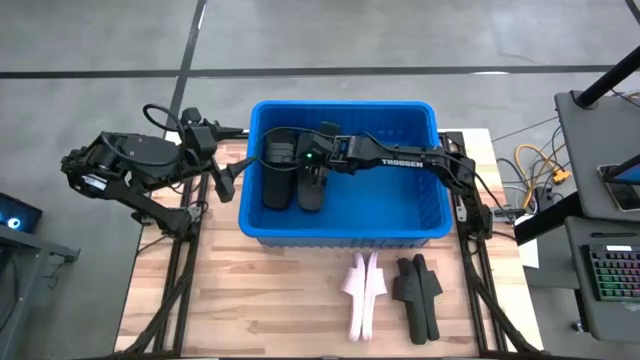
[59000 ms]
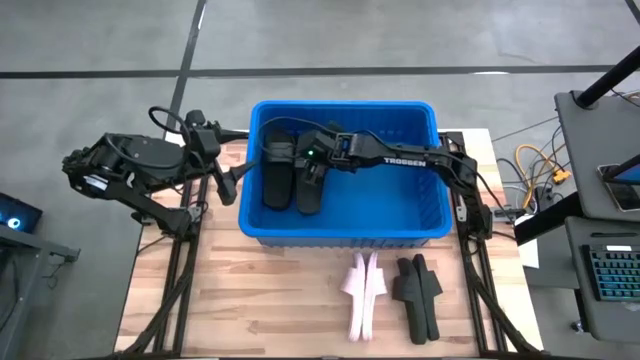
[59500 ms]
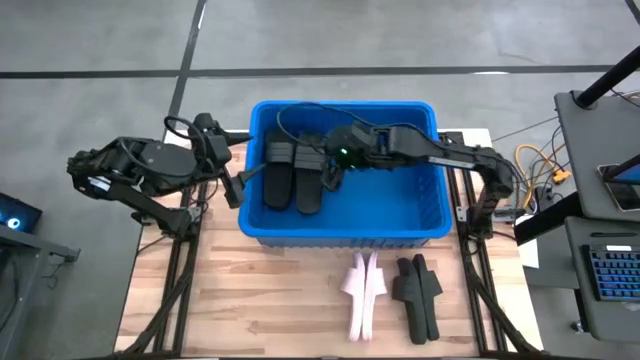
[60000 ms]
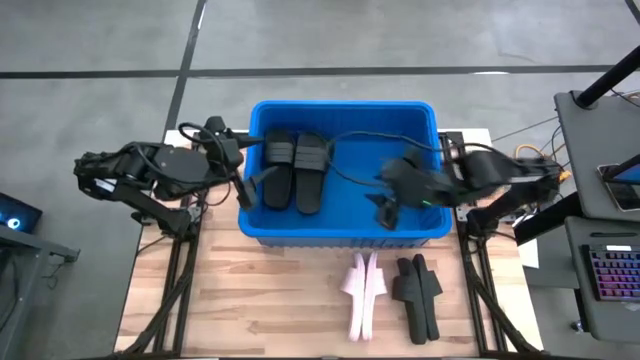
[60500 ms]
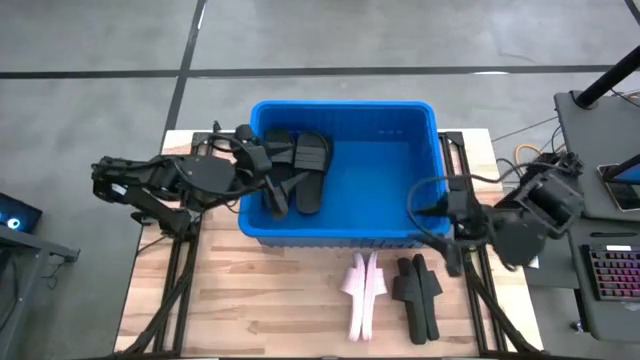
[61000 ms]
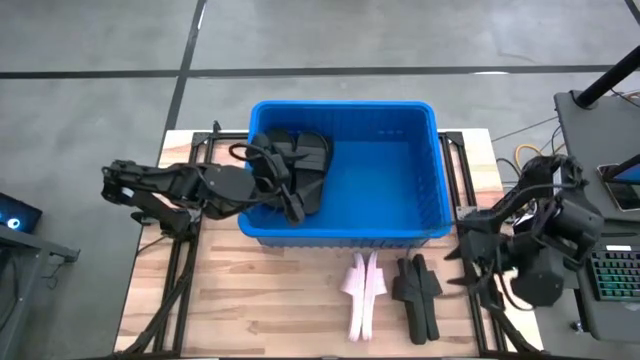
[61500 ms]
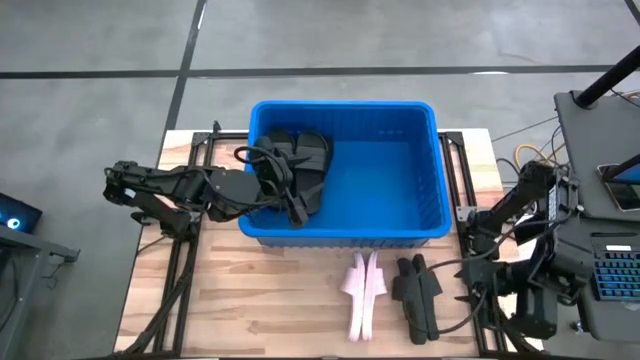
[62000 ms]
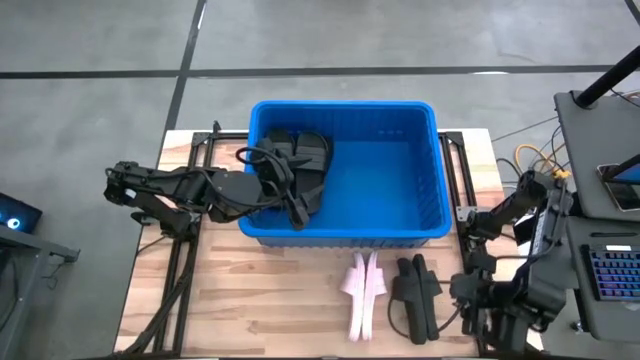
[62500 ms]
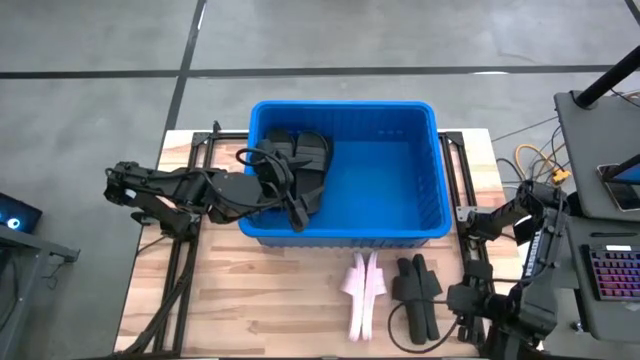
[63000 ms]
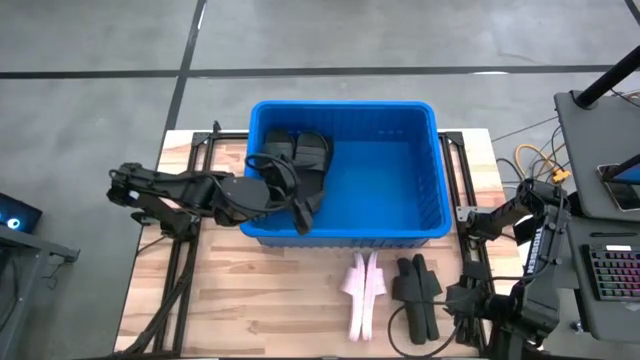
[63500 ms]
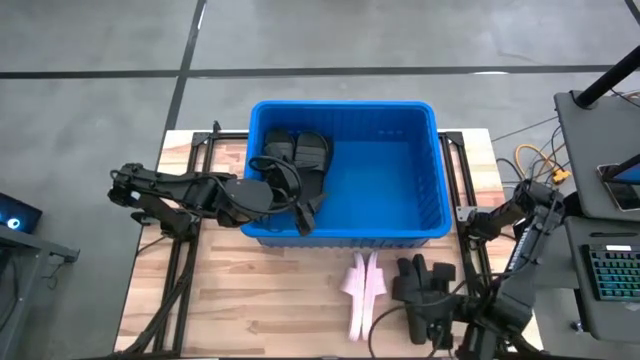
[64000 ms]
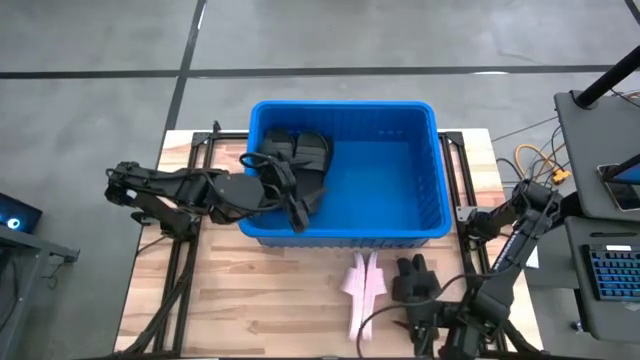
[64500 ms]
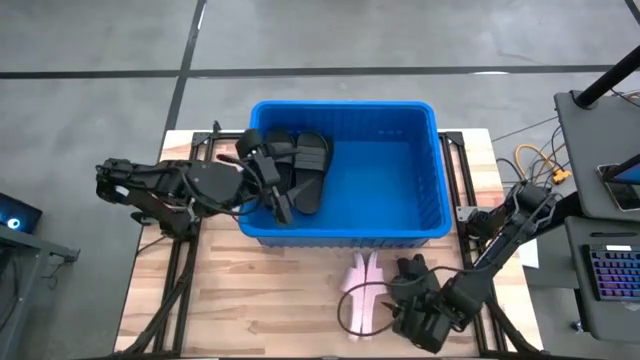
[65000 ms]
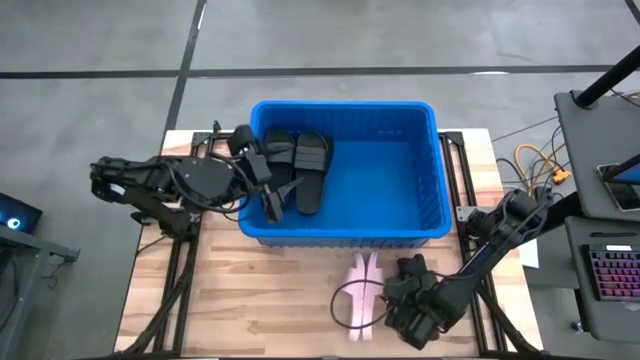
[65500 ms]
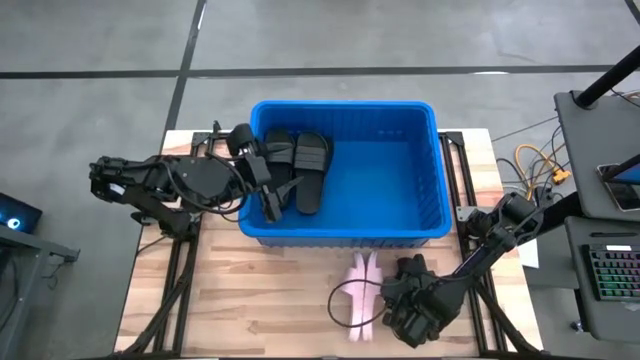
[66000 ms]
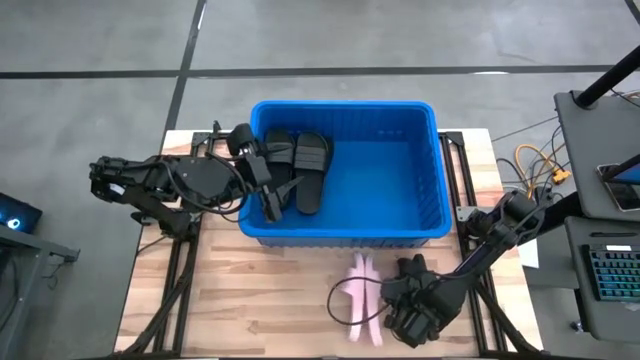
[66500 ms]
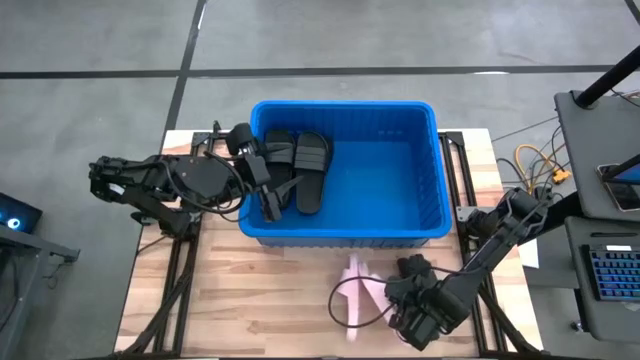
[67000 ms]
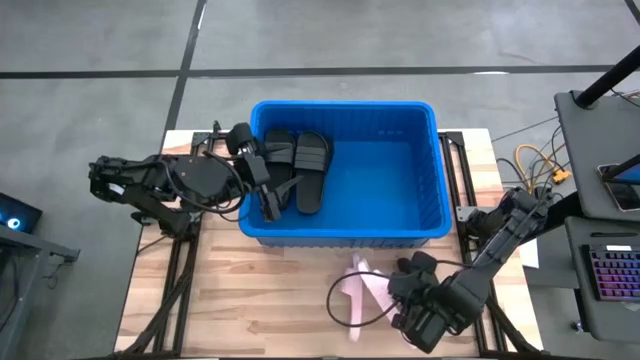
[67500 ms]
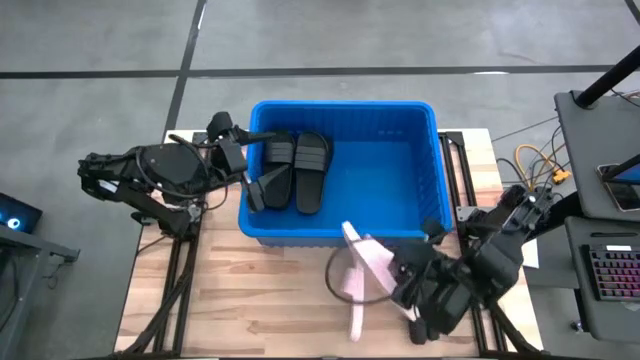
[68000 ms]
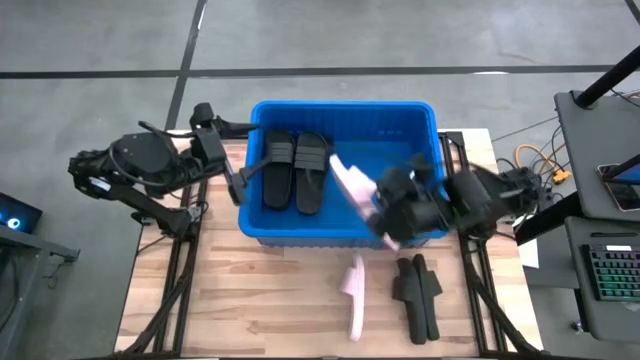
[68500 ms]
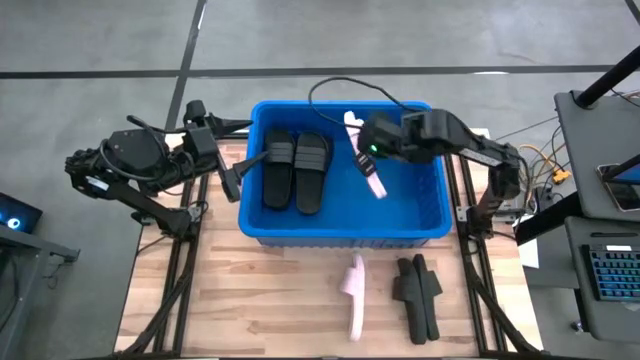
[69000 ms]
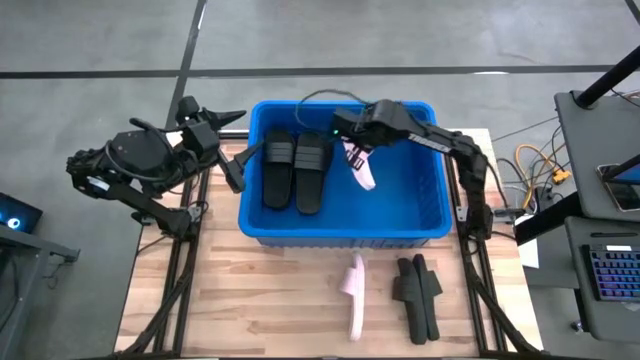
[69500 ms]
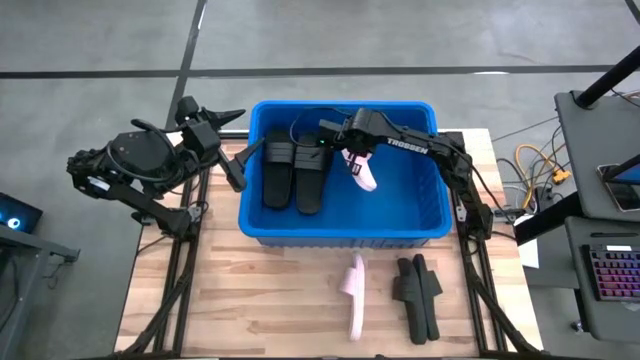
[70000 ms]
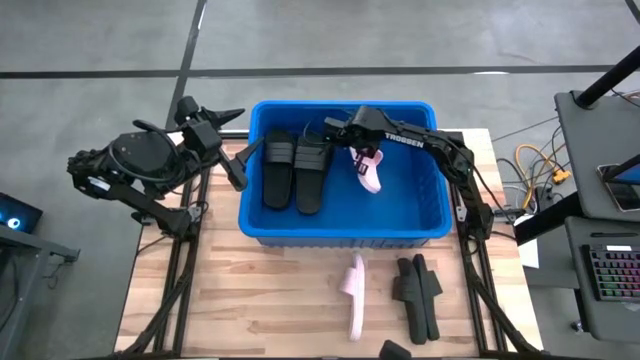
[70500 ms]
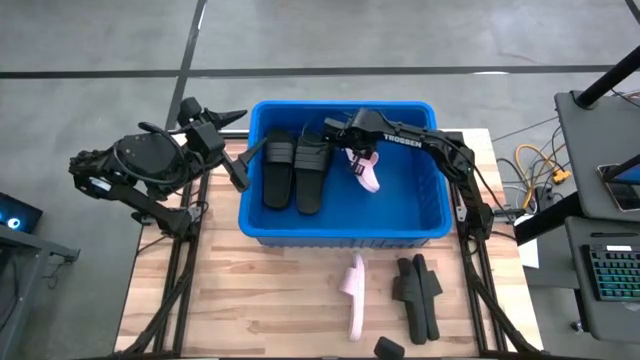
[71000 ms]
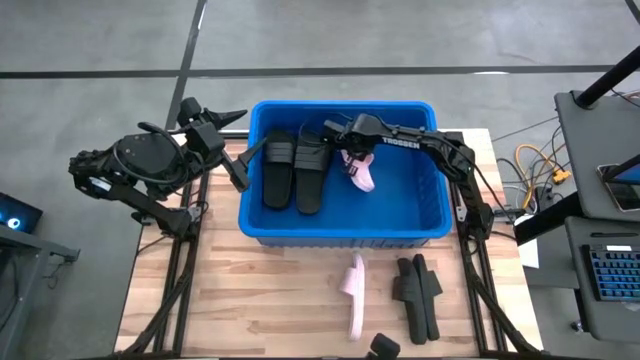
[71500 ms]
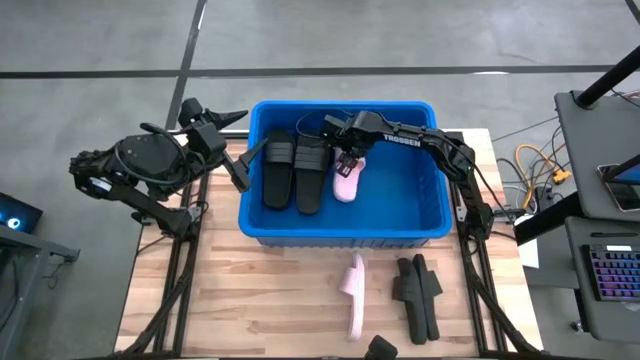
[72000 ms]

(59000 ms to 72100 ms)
Task: Pick and place slides into bin
Put the pink slides into the blue bin

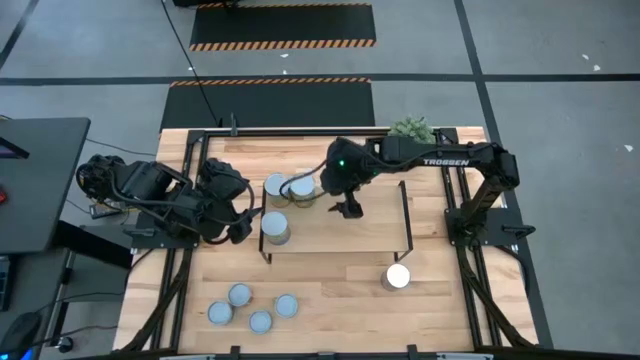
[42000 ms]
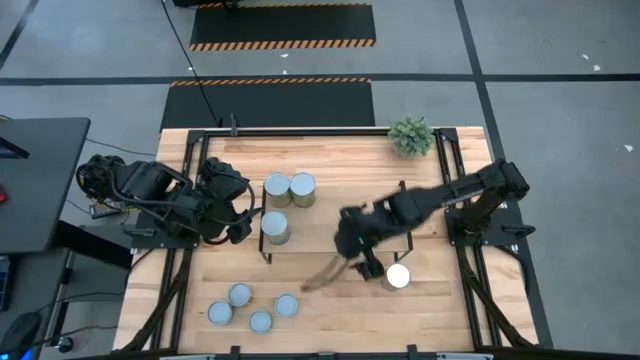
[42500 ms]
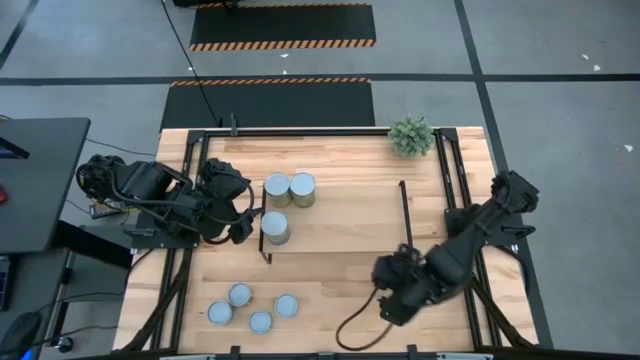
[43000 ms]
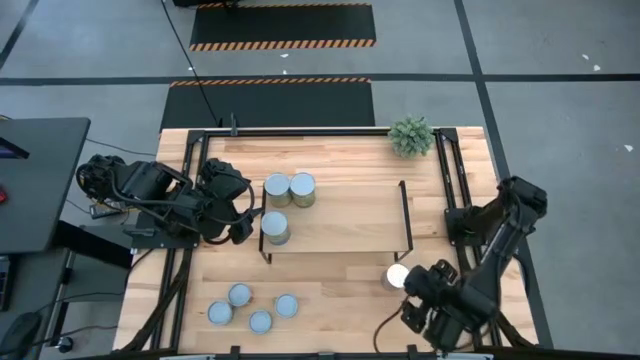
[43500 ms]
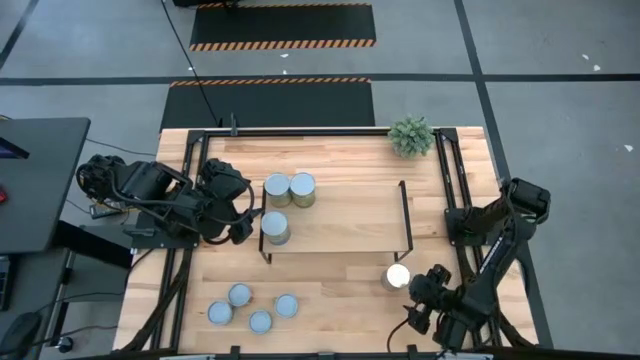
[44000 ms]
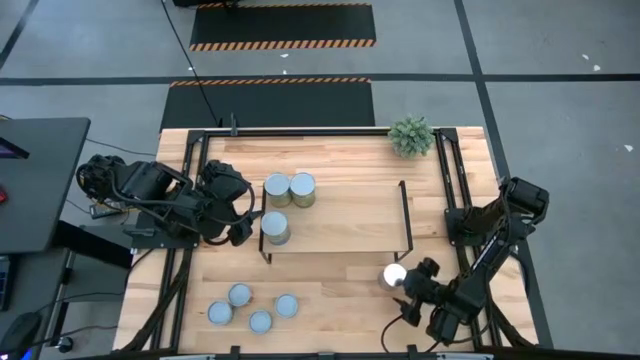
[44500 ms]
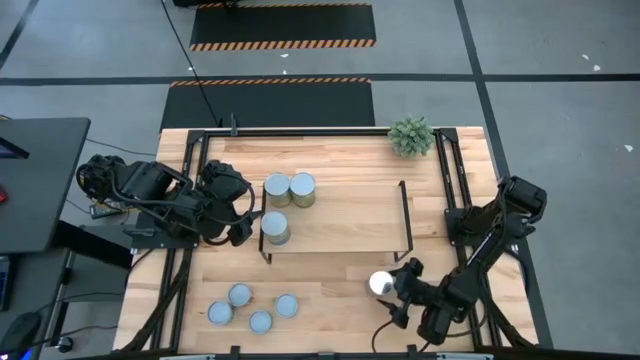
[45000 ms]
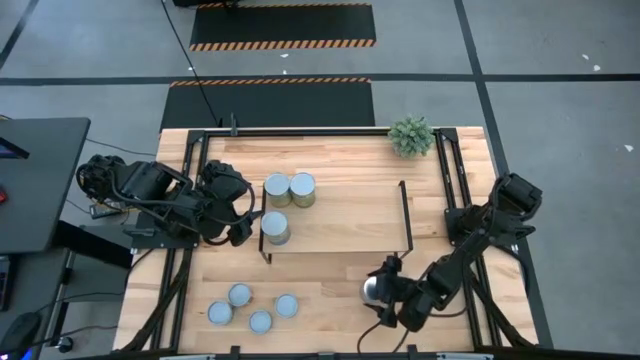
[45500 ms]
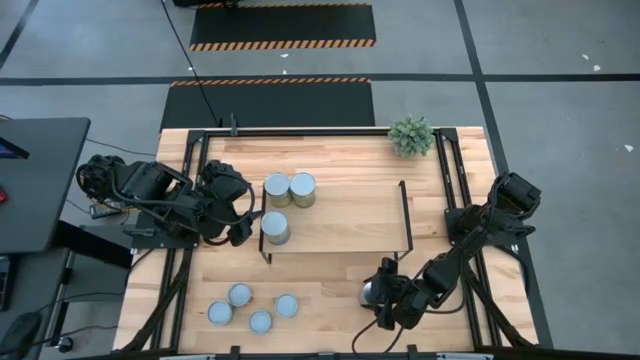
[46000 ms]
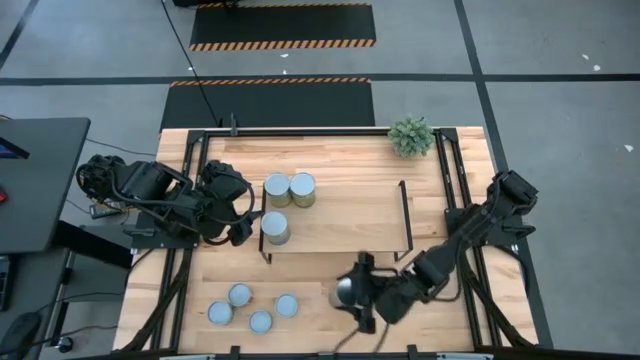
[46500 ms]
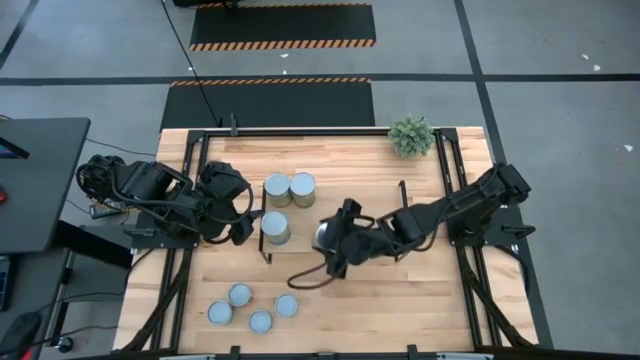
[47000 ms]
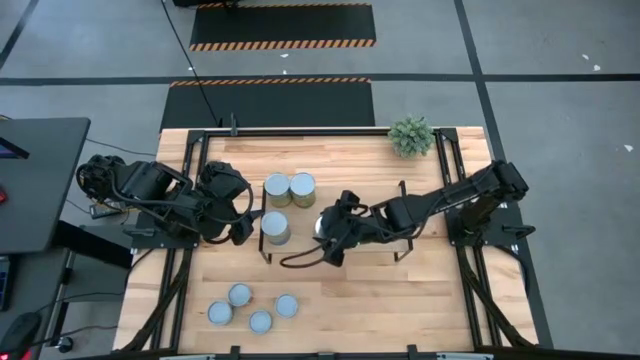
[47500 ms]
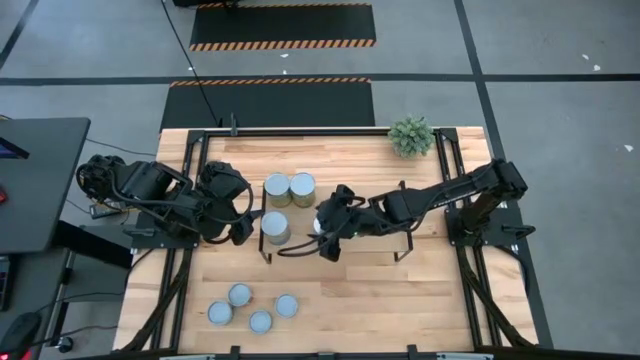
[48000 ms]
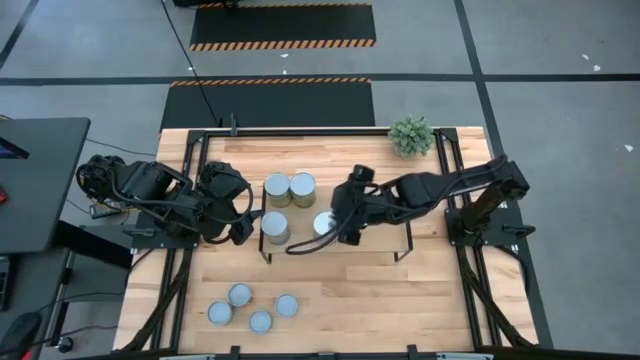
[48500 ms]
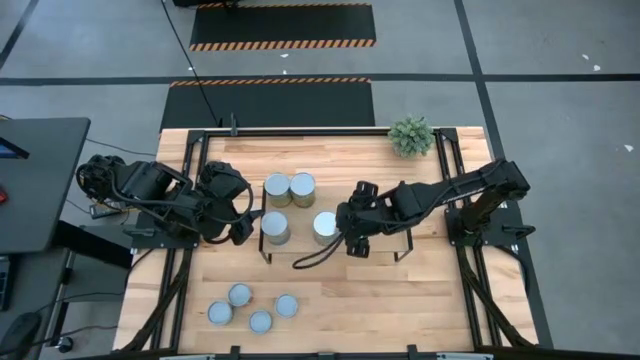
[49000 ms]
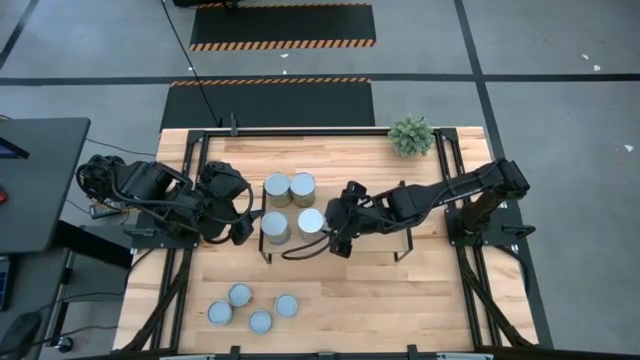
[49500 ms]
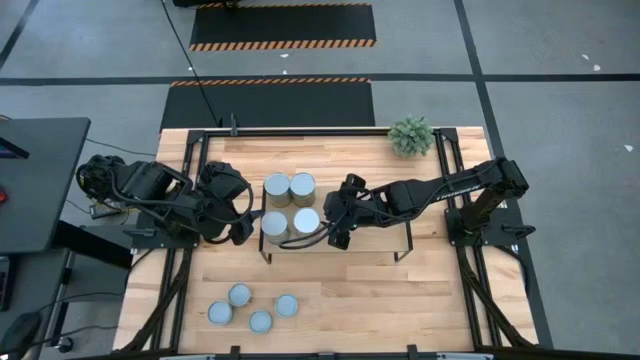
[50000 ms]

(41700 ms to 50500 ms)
Task: Pick and place cans onto a shelf
Put the canned peaches on the shelf
